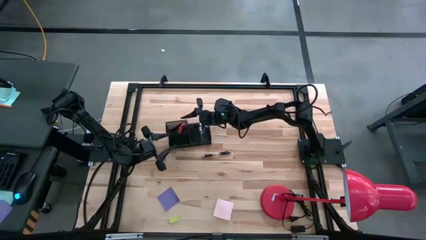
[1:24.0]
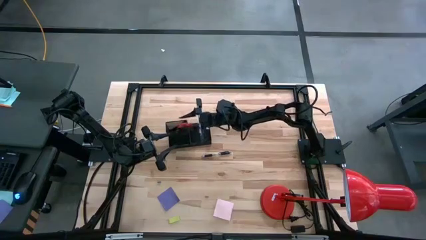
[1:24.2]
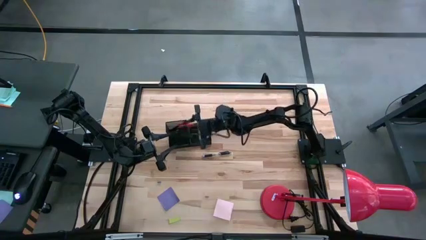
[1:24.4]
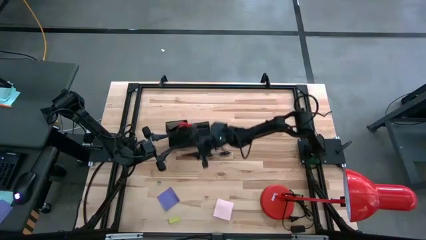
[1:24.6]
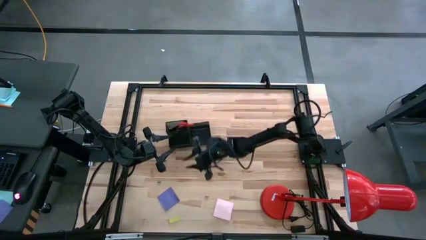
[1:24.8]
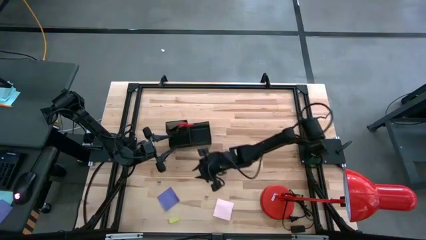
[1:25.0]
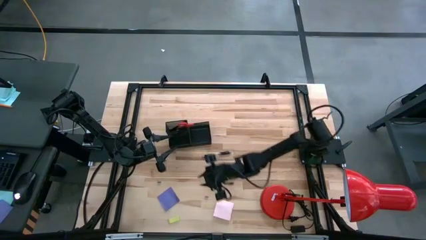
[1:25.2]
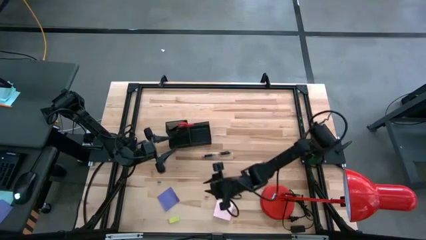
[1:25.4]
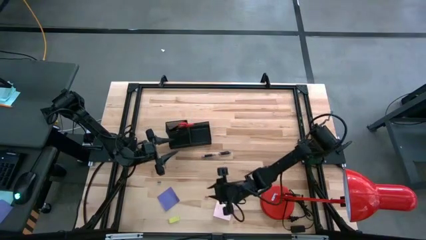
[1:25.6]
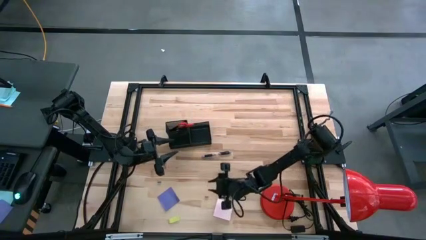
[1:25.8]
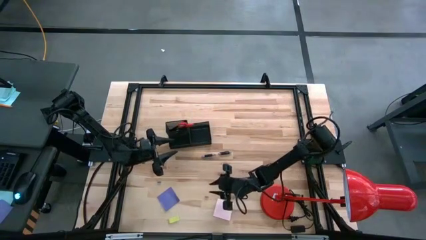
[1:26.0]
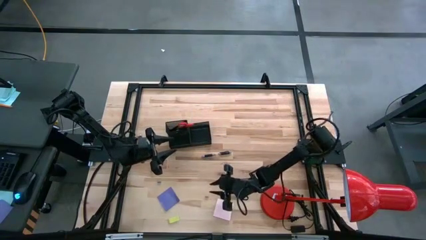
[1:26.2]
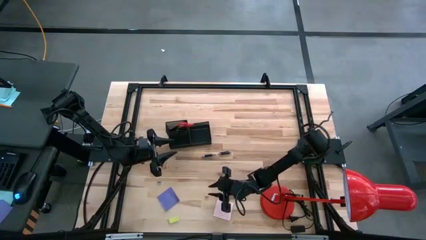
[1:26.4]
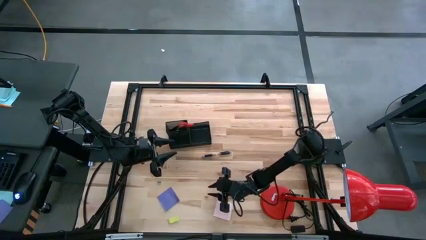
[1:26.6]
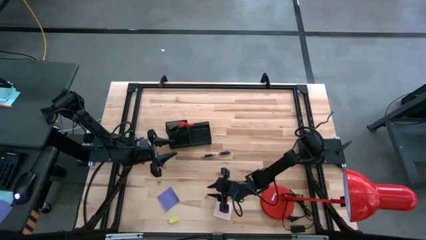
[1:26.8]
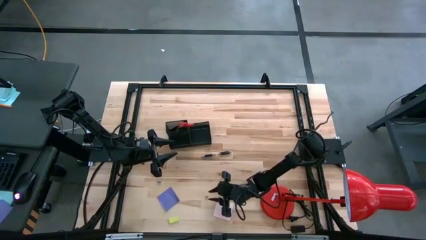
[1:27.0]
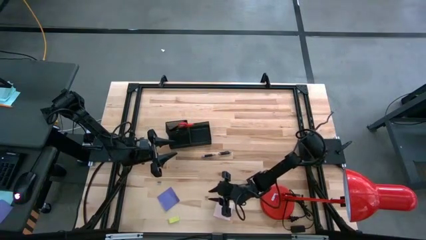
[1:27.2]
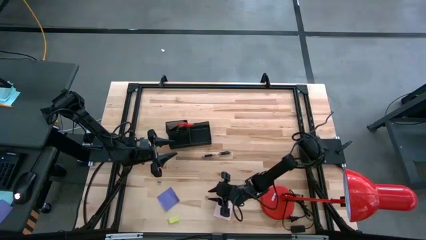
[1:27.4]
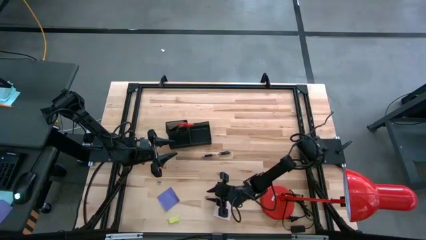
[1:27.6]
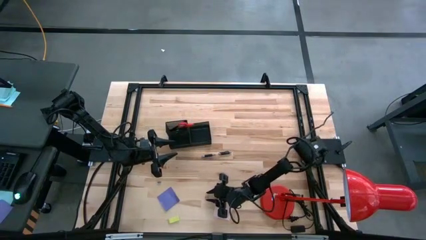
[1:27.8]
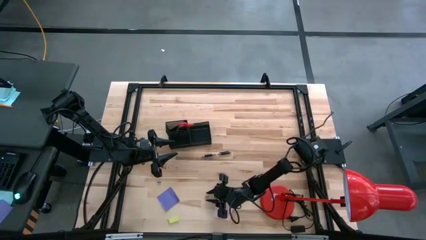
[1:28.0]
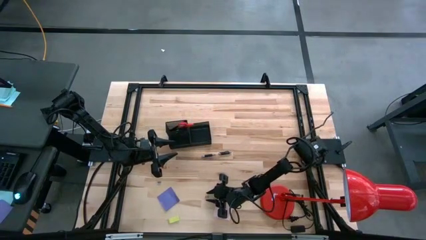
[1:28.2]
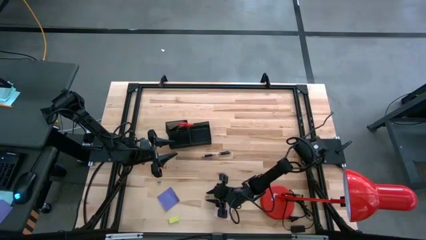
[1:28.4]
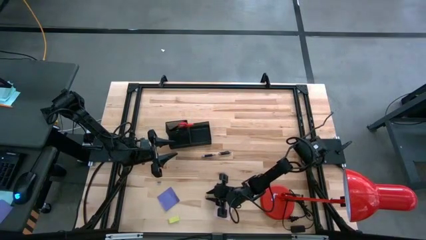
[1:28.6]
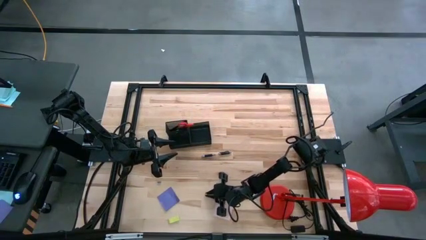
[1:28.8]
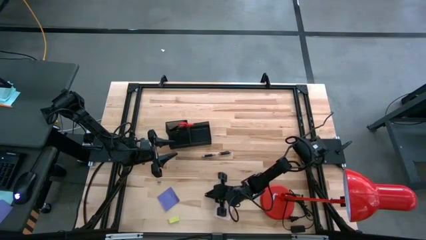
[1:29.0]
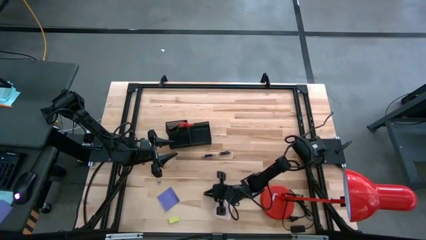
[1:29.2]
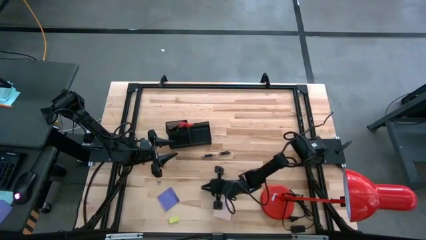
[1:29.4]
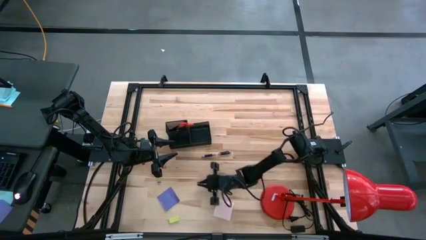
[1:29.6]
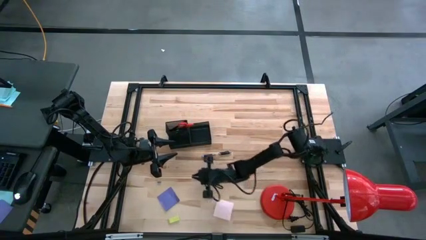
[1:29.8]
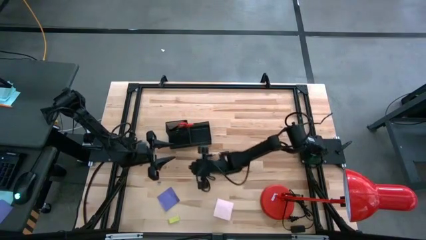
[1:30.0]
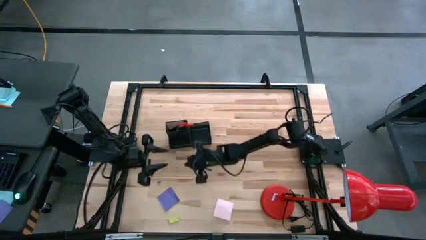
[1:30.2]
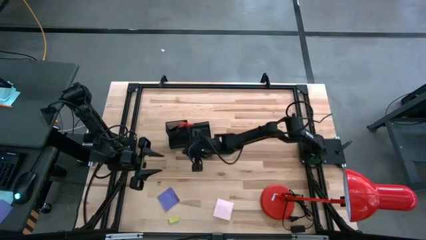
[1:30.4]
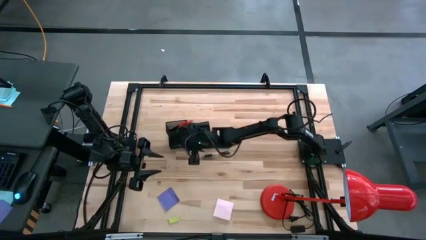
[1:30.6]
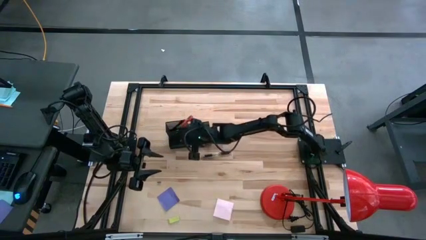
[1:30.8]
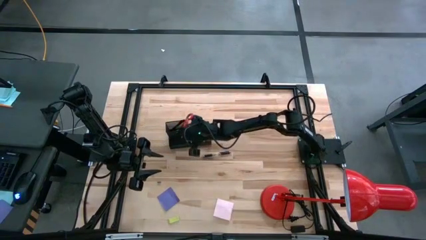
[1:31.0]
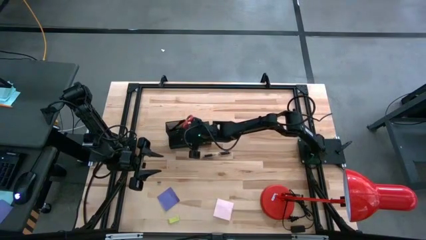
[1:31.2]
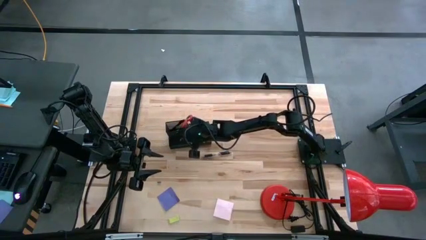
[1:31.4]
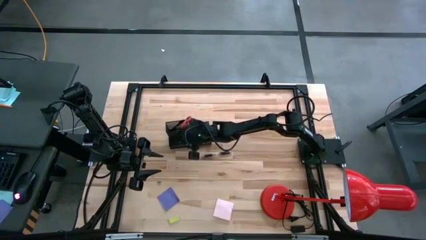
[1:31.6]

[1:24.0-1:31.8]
Task: Pick and place office supplies into organizer
Put the middle pink binder clip into the desk organizer

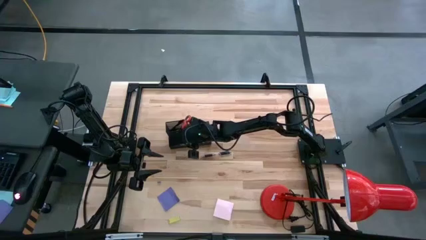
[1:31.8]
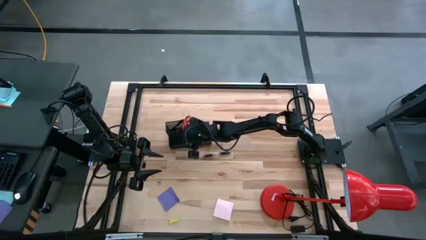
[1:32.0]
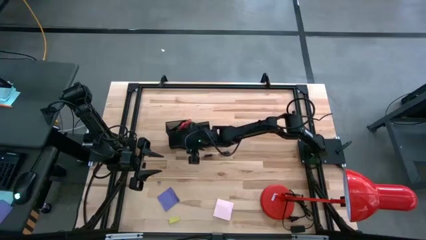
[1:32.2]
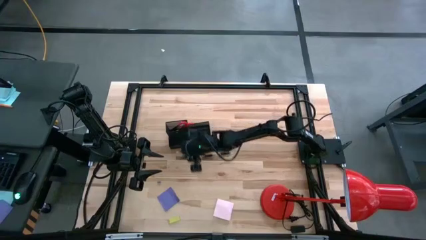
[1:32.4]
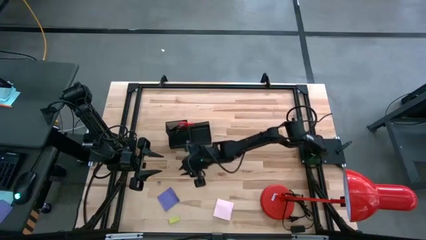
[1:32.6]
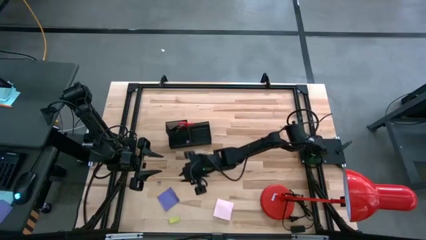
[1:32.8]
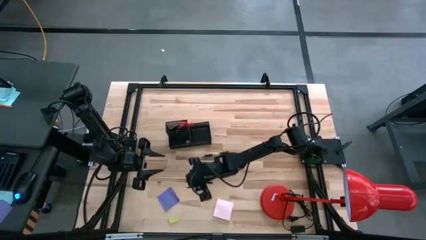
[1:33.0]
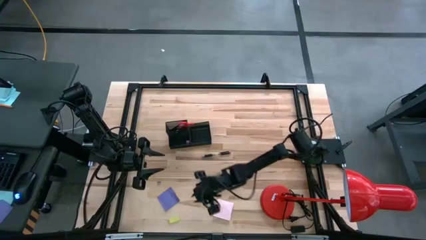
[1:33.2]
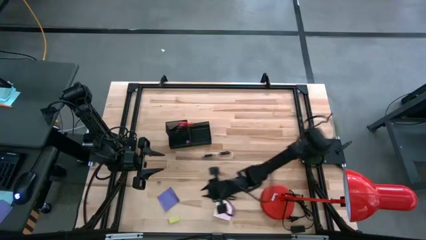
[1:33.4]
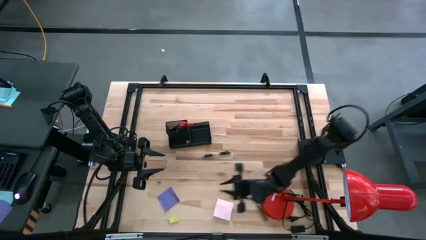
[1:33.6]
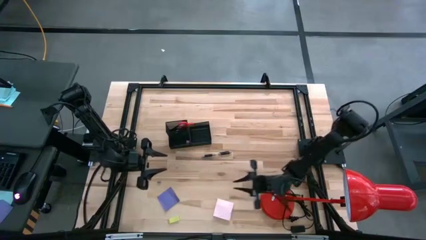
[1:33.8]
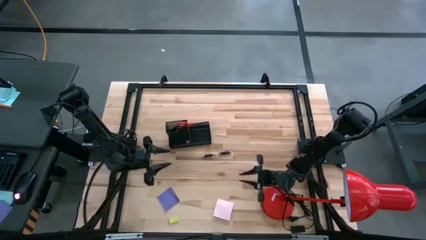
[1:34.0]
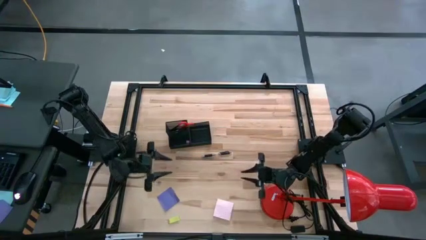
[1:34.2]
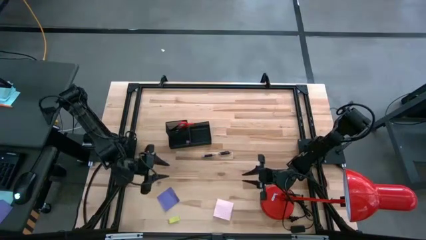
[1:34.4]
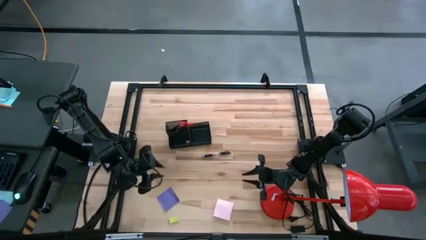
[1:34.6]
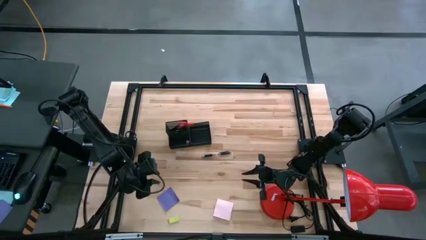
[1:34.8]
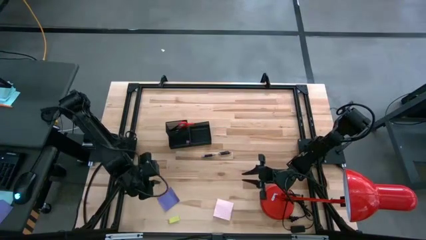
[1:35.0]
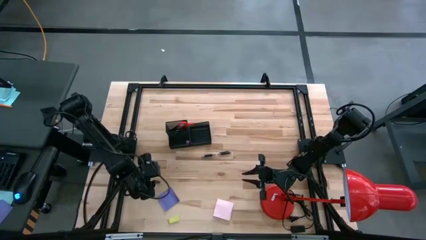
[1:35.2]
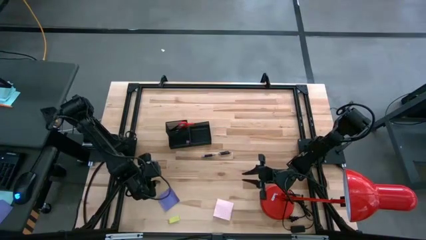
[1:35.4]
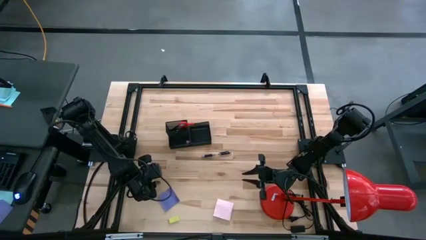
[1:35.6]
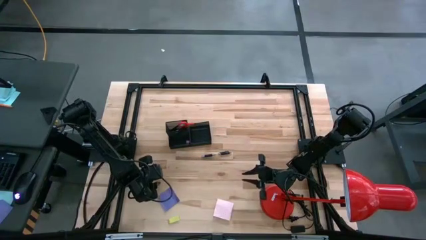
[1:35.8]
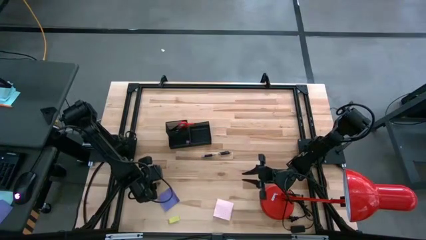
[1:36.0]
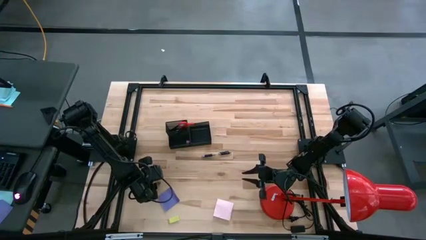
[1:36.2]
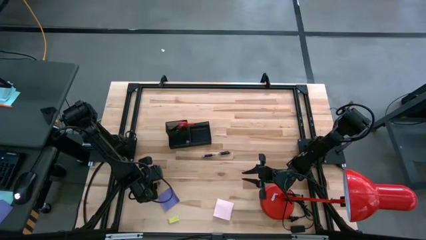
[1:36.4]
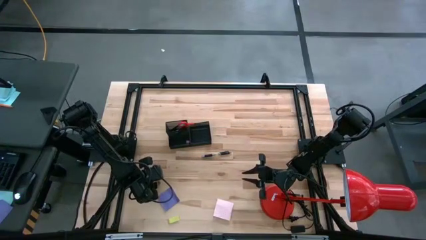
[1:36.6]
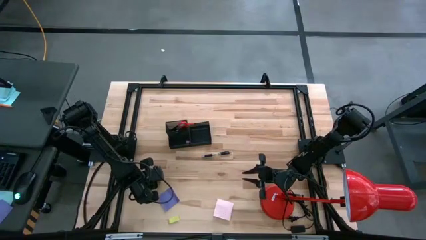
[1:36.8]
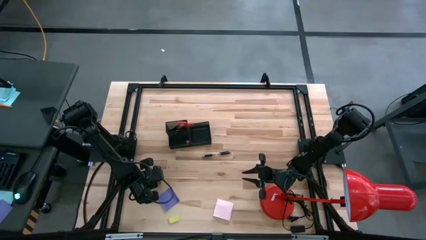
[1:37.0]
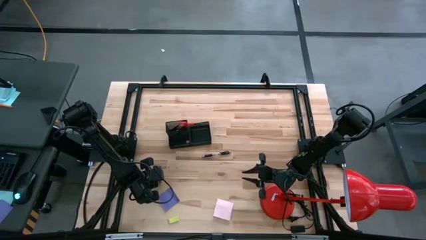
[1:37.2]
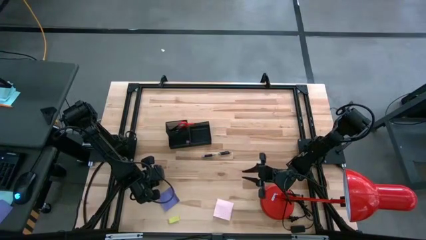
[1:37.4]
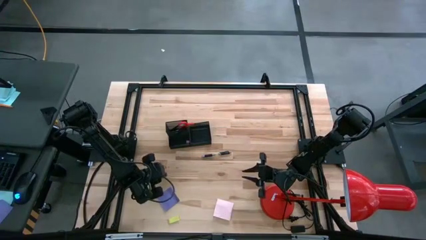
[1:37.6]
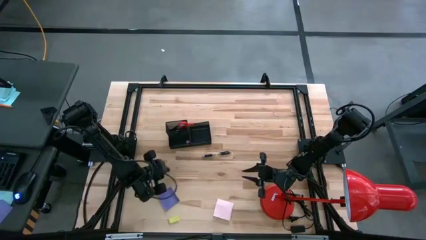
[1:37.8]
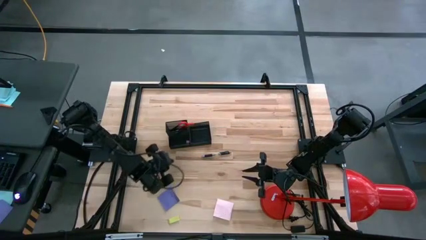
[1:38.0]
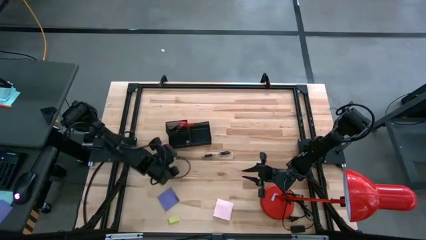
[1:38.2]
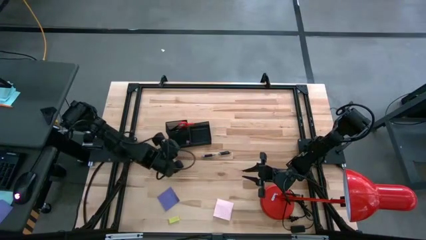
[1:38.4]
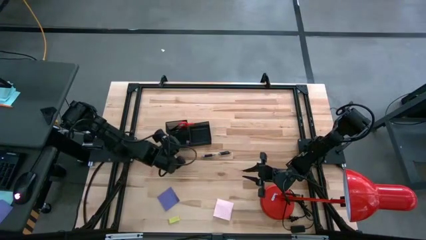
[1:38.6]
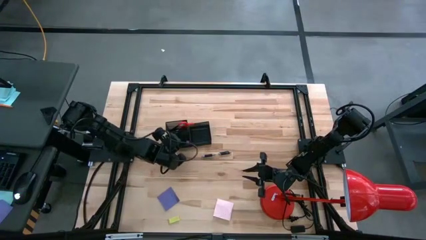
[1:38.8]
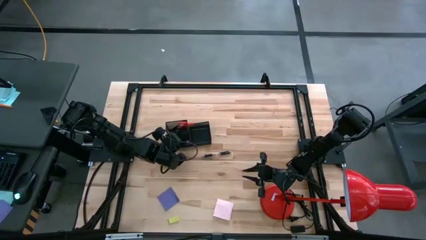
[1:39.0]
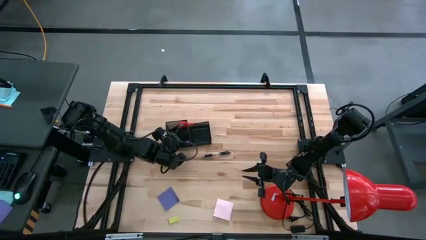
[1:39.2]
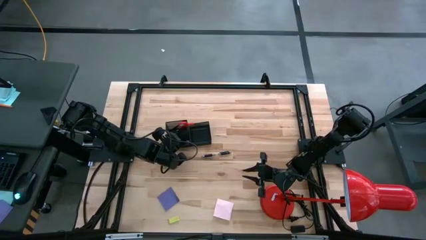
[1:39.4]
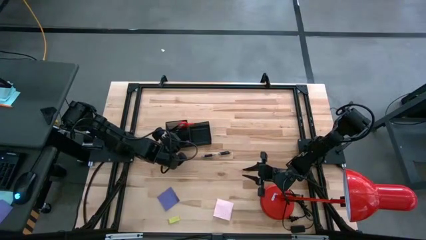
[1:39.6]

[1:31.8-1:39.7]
Put the blue binder clip into the desk organizer
